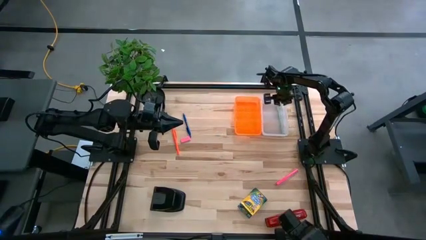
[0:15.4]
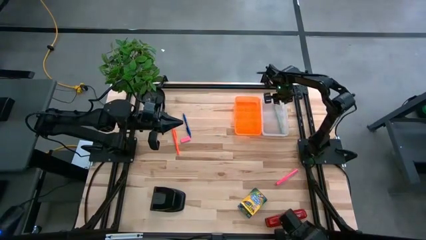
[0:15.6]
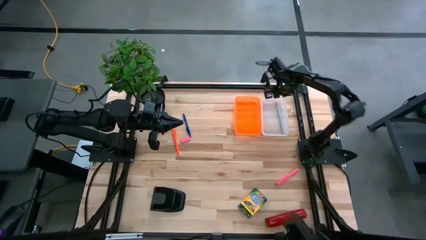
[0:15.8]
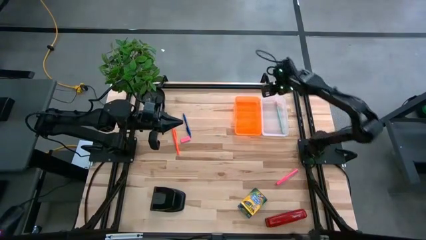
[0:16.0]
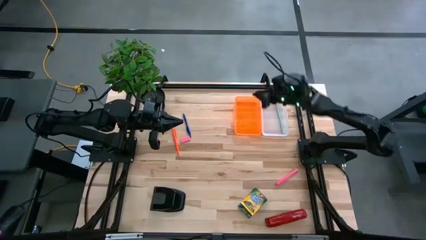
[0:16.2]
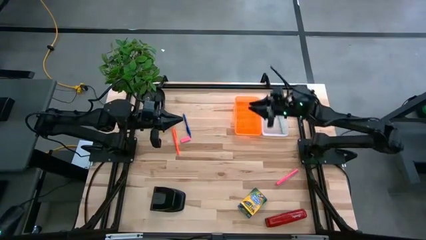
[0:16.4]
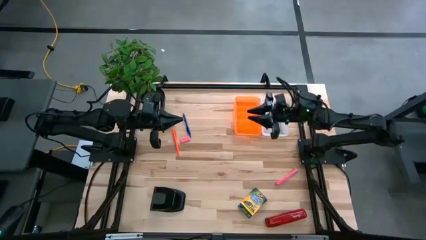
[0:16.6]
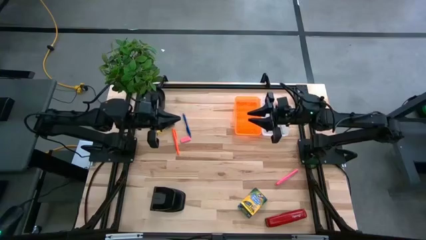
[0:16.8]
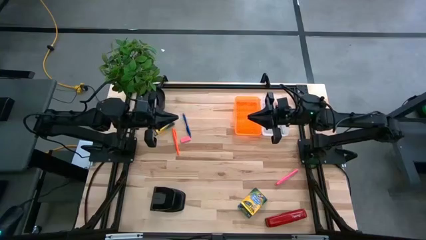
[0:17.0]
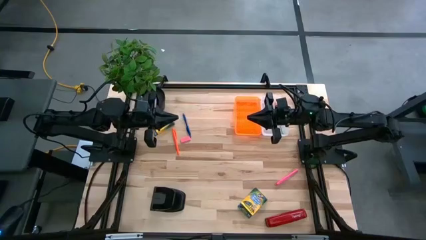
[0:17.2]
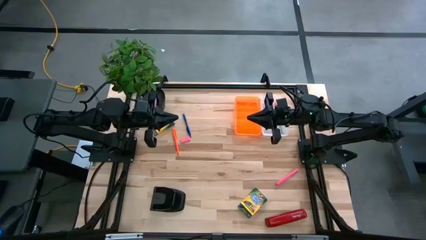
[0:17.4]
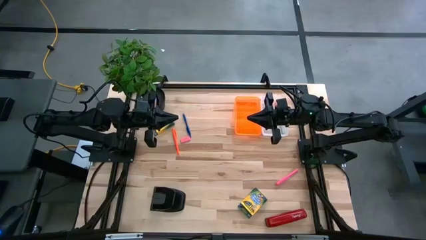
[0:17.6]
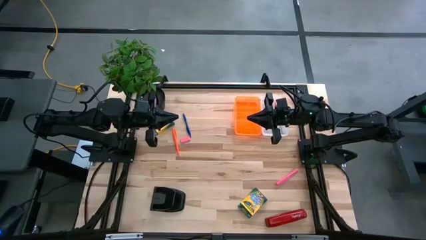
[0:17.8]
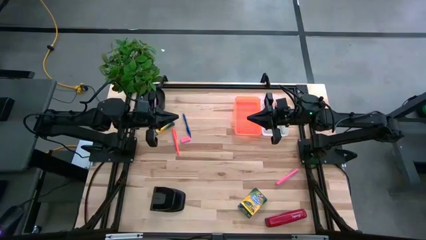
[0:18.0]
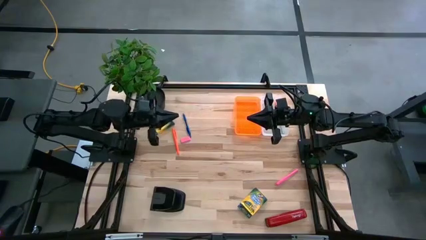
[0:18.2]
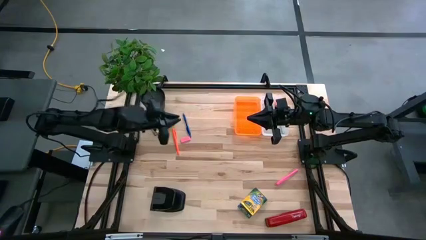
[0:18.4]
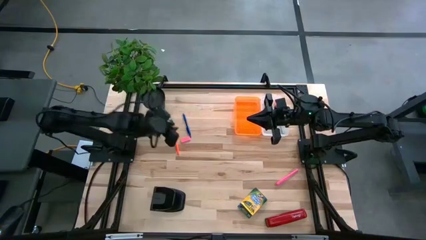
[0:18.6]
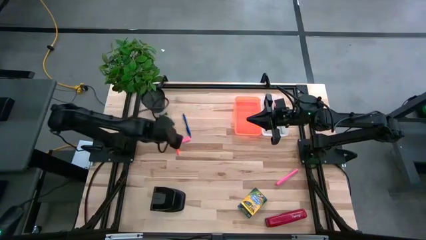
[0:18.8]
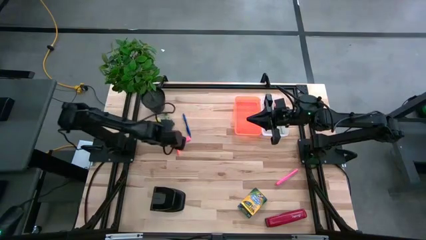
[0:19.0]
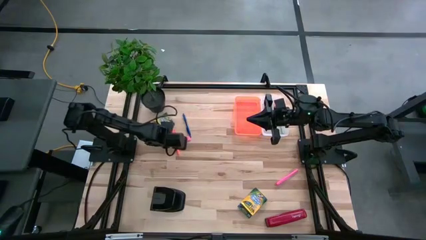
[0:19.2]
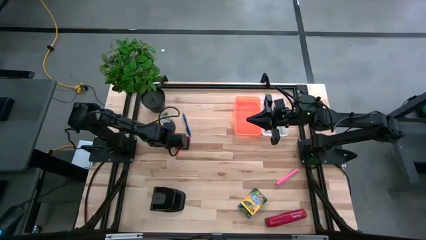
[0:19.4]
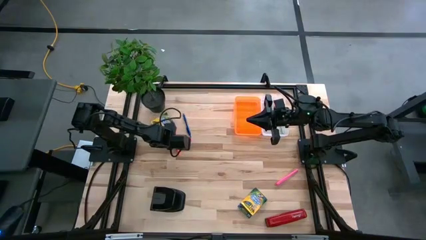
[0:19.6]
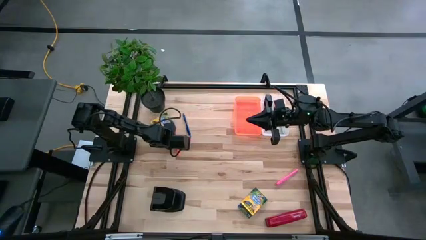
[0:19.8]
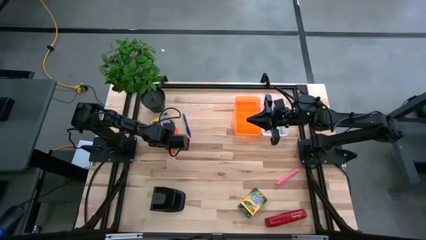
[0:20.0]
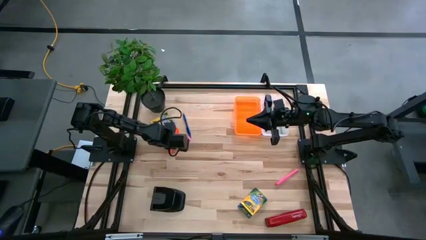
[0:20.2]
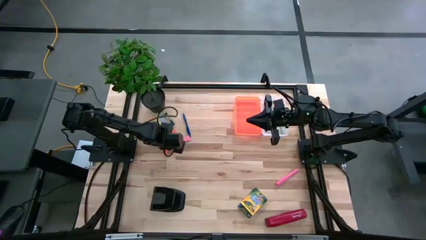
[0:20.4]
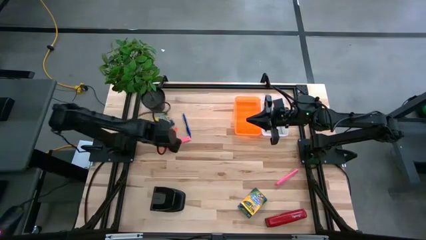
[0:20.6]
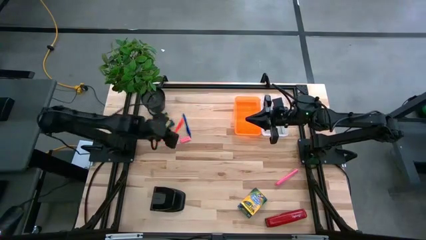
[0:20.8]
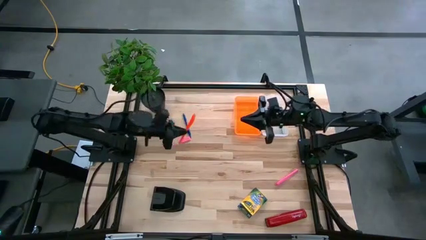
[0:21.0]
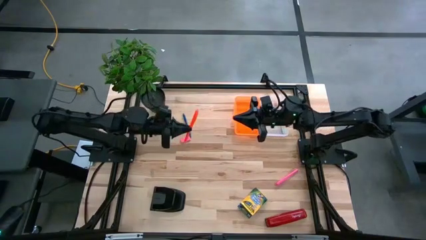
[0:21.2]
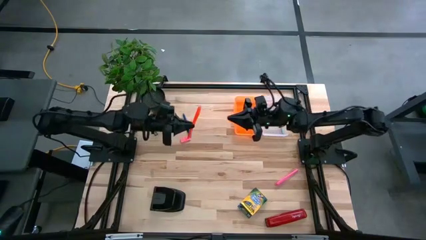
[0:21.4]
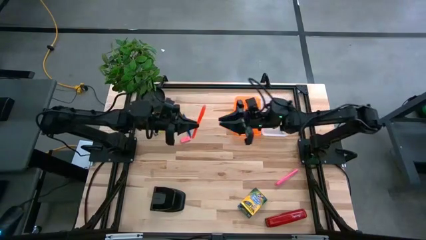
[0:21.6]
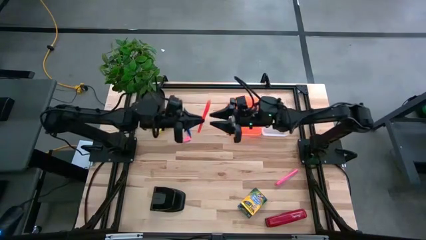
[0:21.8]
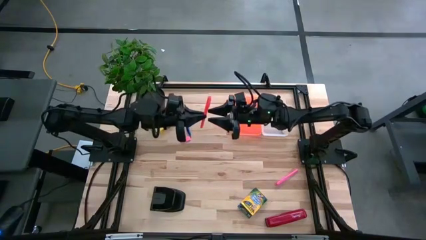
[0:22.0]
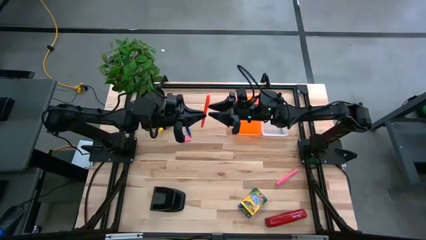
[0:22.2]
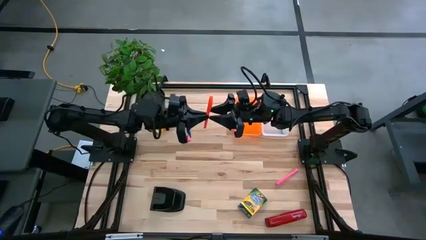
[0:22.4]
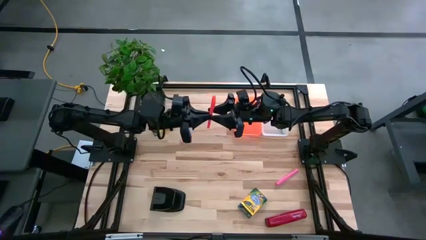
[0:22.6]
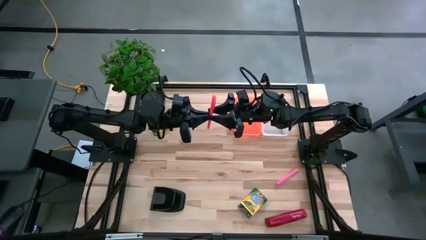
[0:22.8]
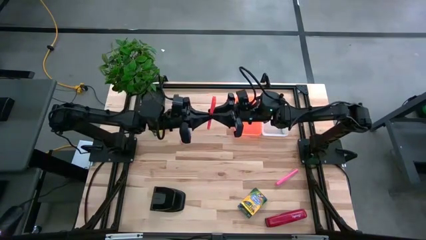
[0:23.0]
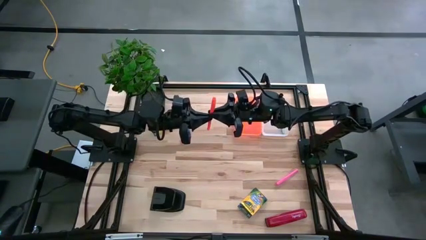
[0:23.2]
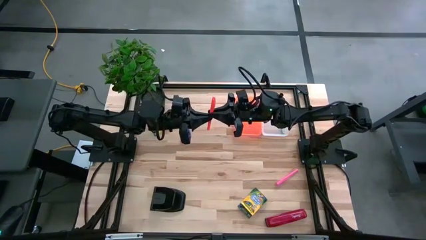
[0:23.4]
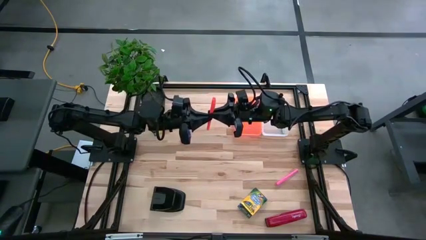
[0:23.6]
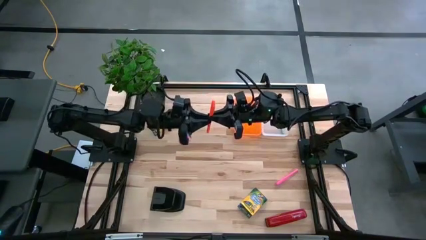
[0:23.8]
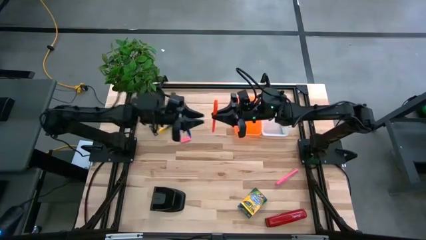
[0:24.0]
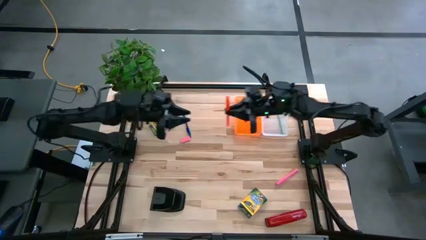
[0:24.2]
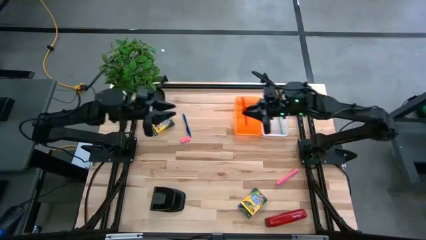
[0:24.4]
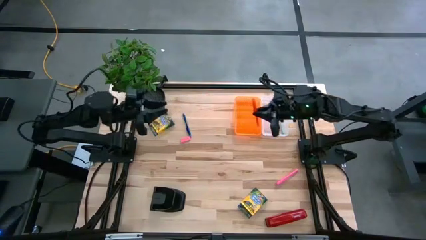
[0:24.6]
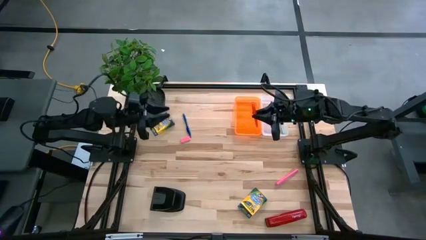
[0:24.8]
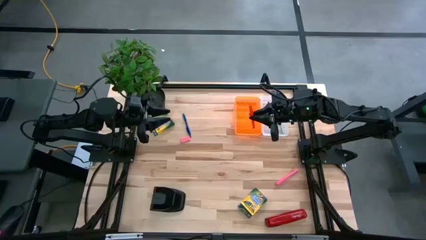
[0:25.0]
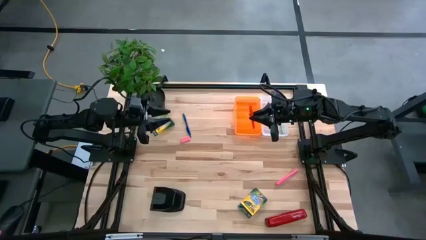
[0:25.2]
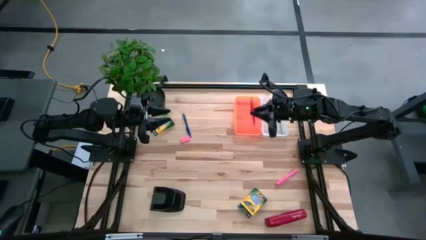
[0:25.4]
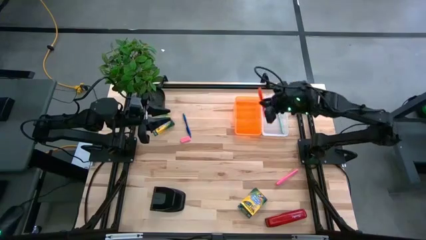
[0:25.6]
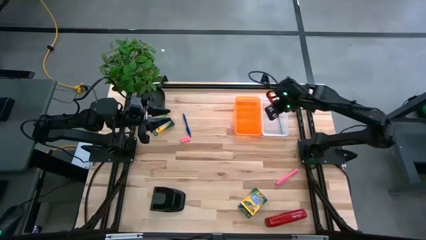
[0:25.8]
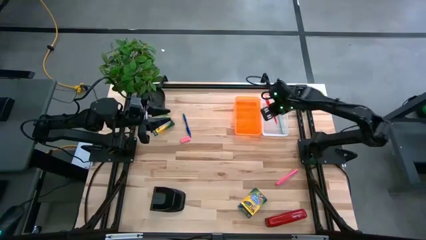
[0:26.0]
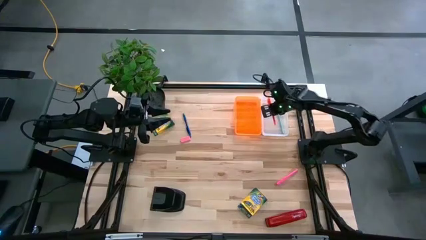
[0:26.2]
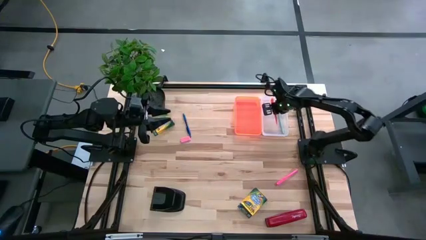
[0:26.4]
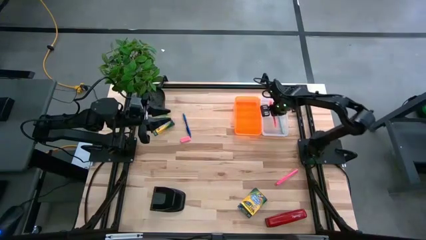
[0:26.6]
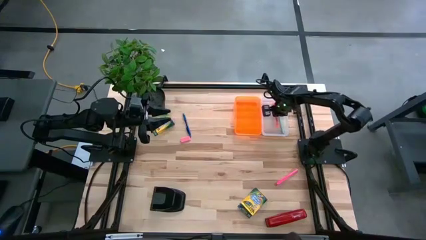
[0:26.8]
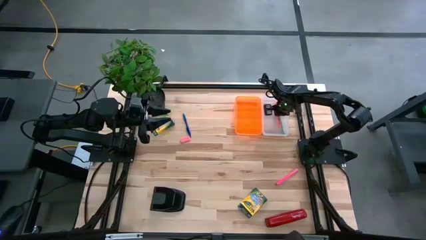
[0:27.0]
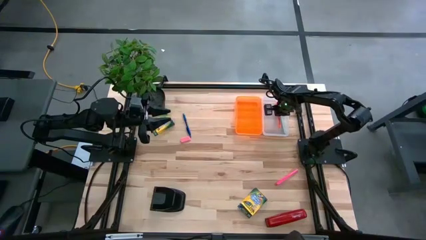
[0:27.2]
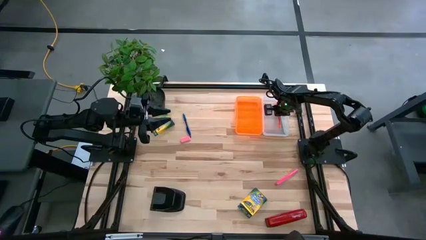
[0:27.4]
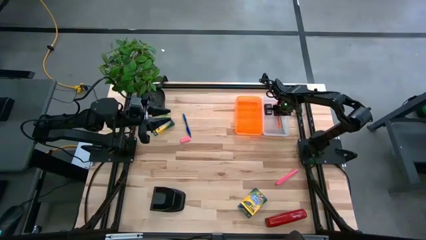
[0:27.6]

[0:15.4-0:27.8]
Task: Pack school essentials
Put the orange pen into the orange supply box

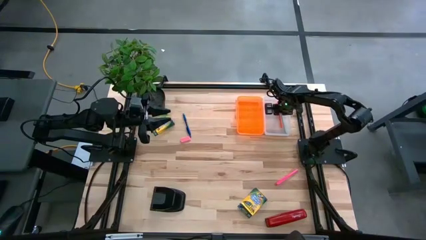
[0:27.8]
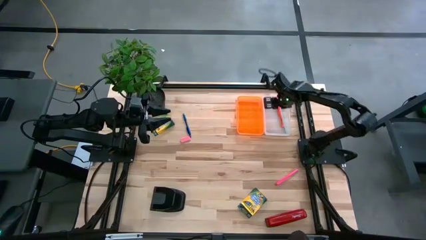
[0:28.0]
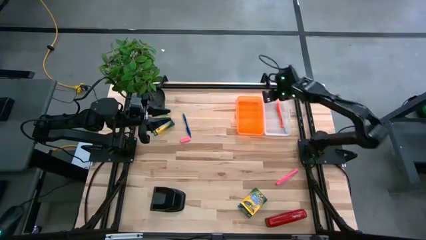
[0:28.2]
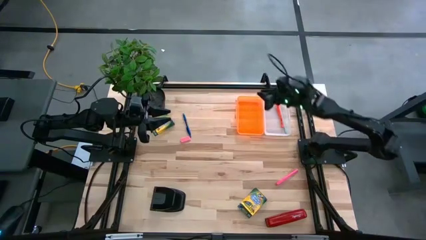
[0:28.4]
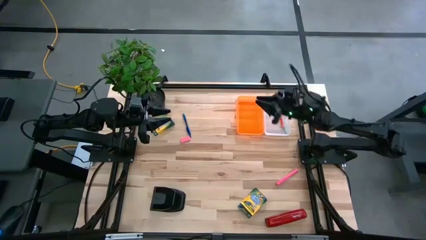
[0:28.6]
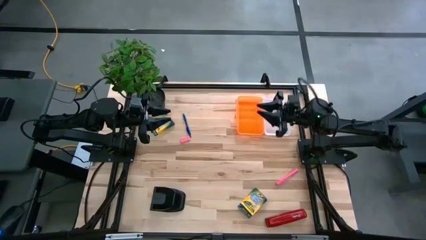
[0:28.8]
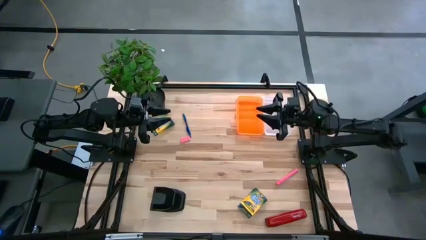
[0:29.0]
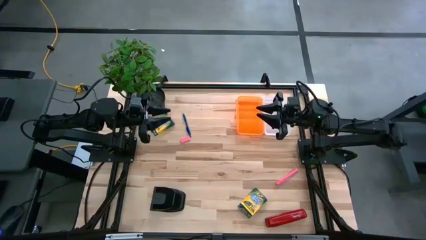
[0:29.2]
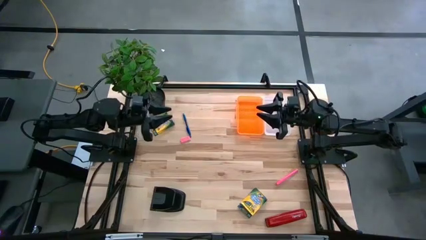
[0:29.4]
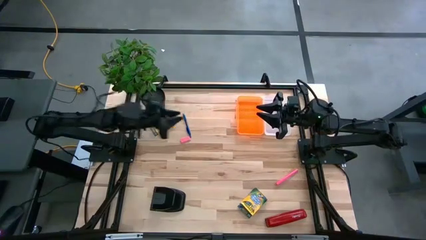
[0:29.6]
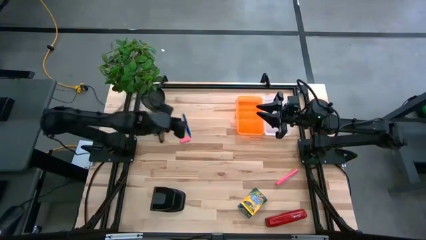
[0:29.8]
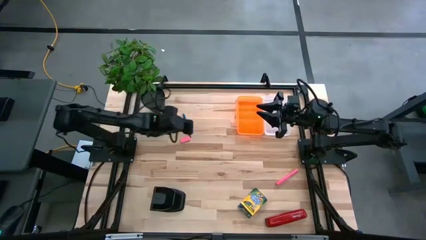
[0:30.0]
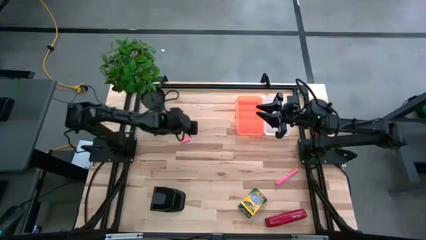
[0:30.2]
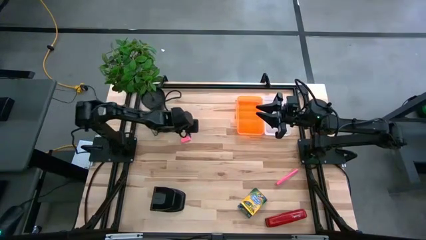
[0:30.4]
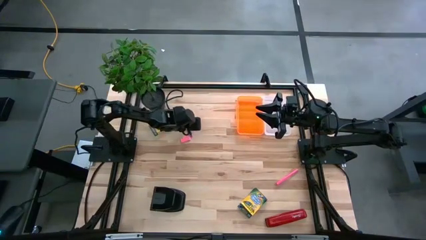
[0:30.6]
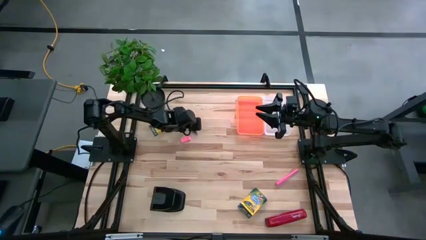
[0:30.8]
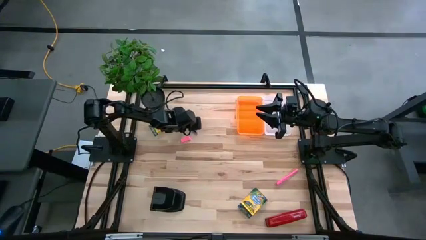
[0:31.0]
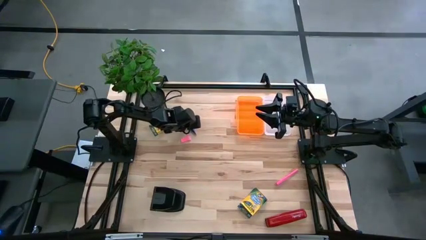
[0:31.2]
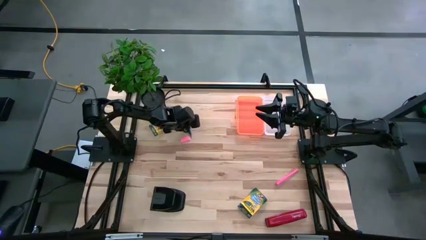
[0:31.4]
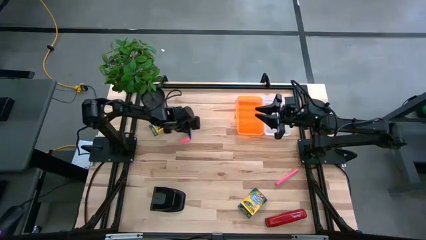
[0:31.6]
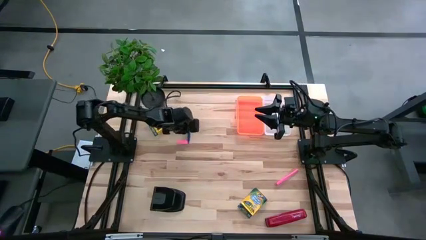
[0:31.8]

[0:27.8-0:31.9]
Put the blue pen into the orange supply box
